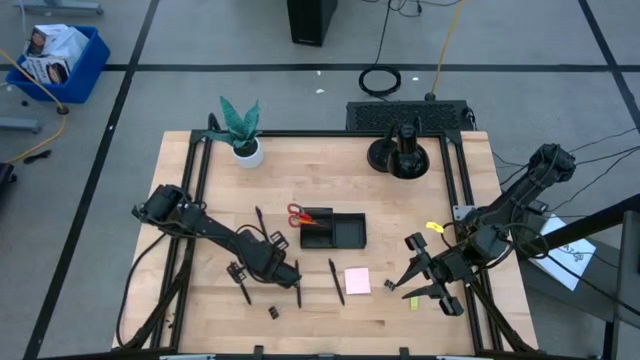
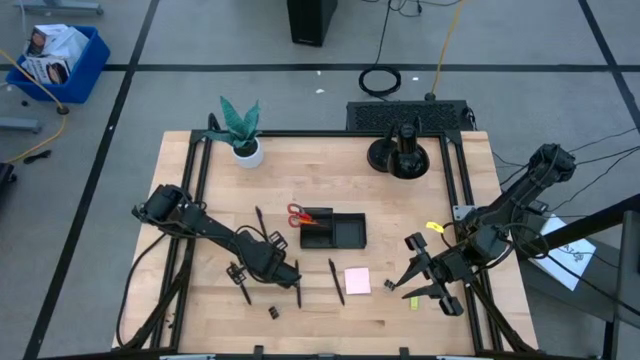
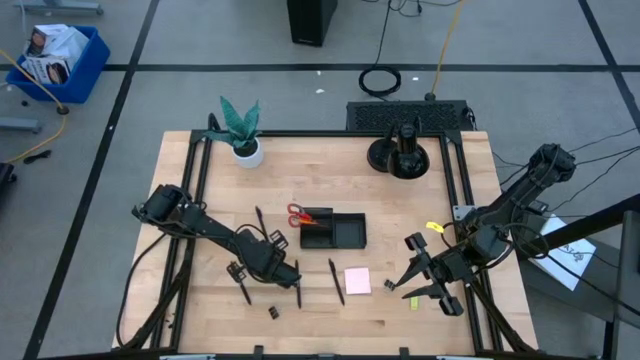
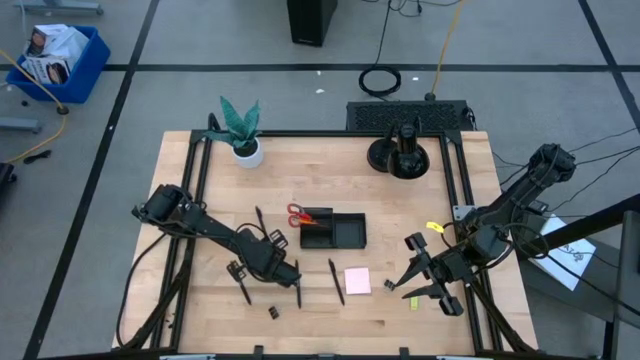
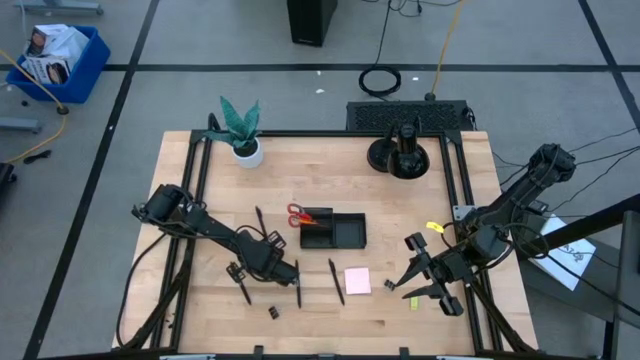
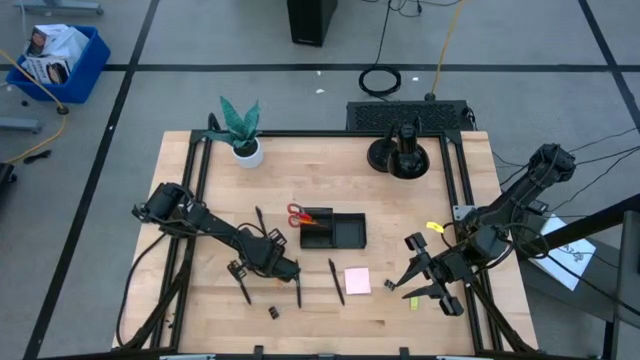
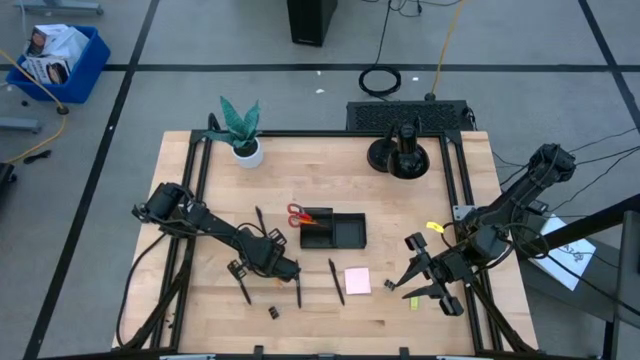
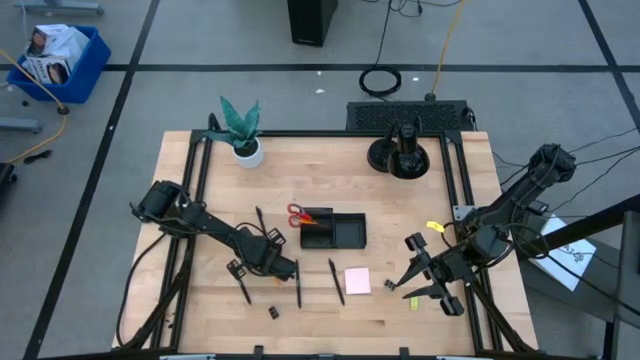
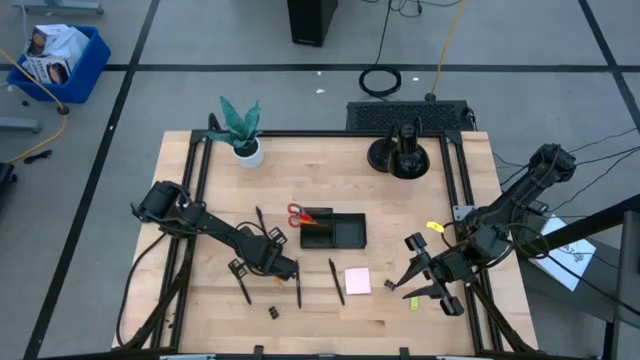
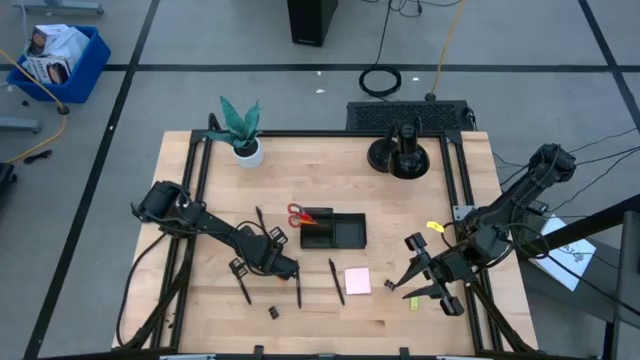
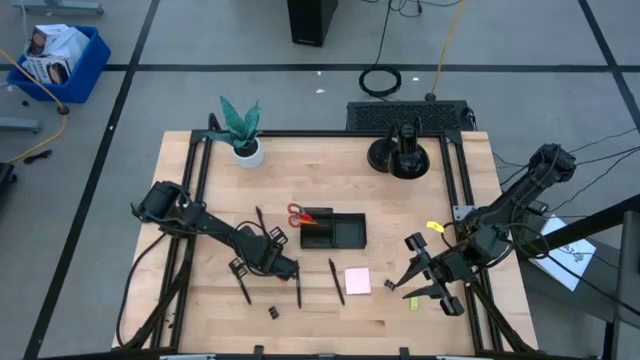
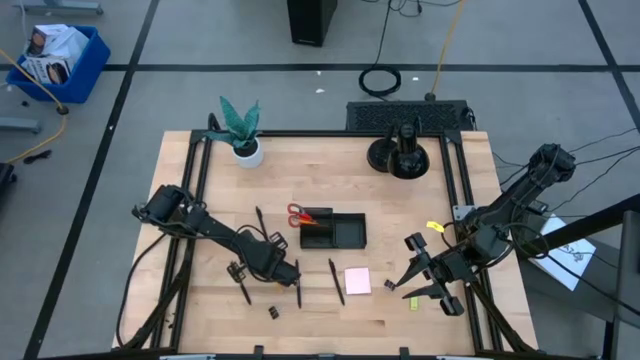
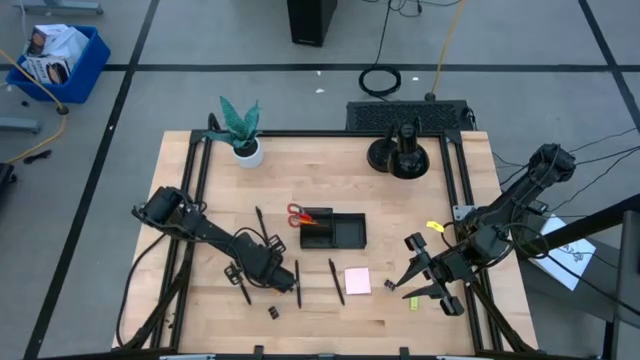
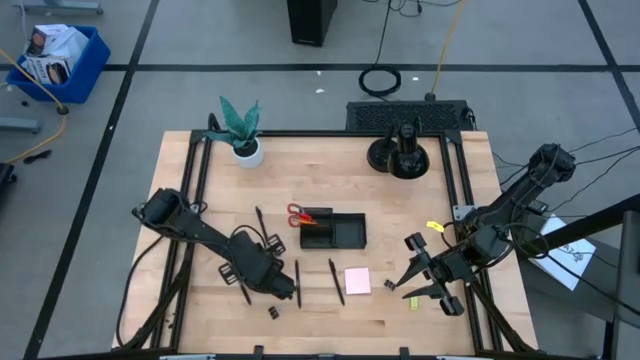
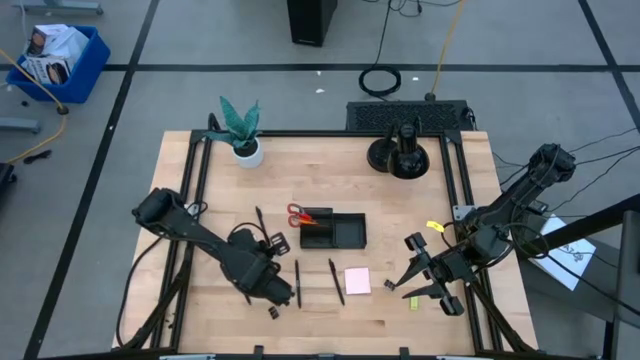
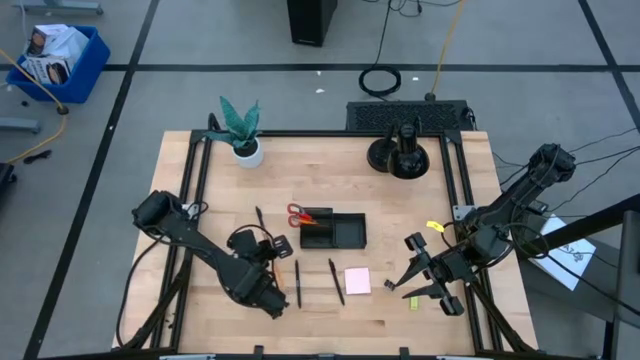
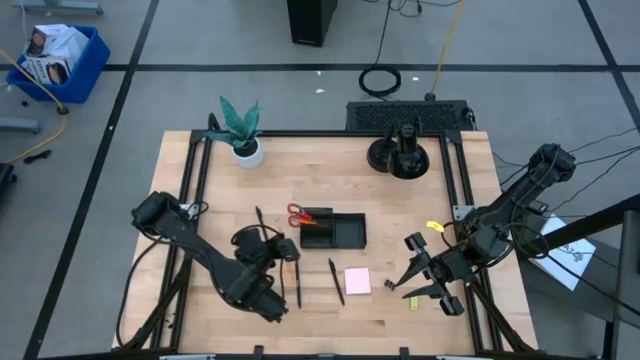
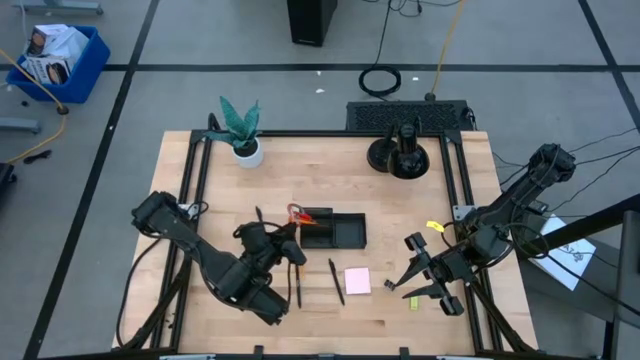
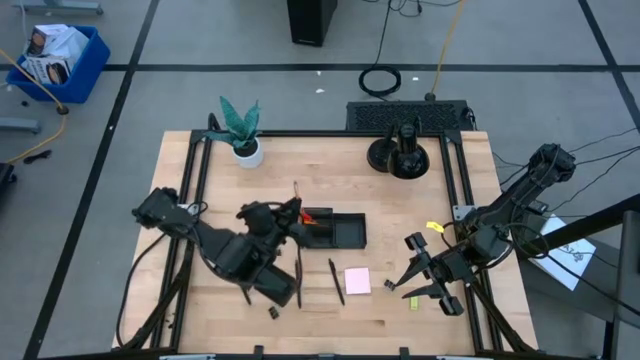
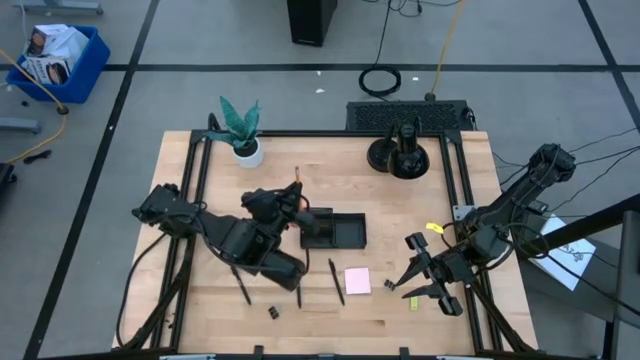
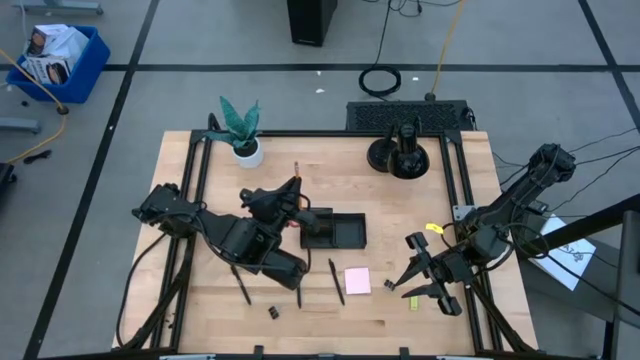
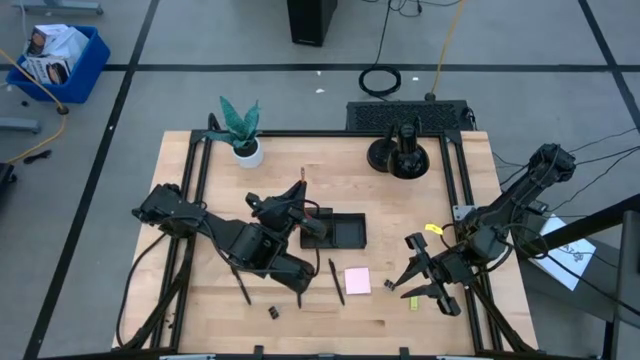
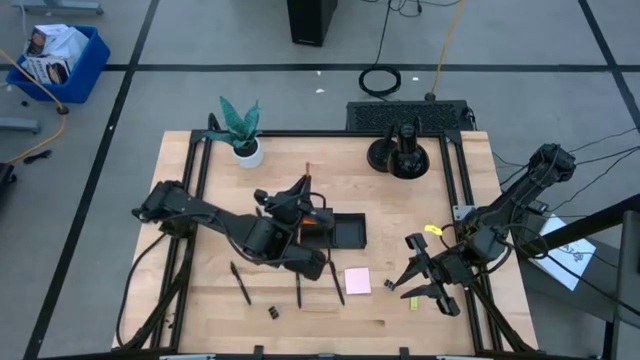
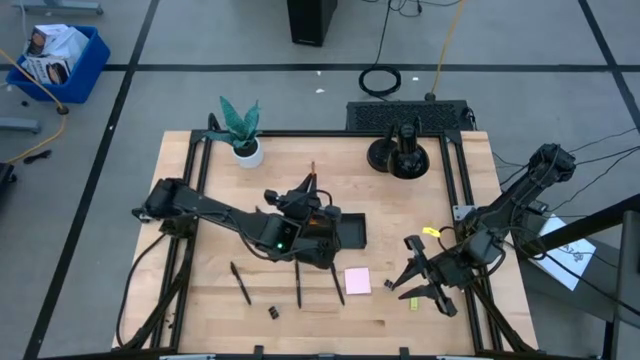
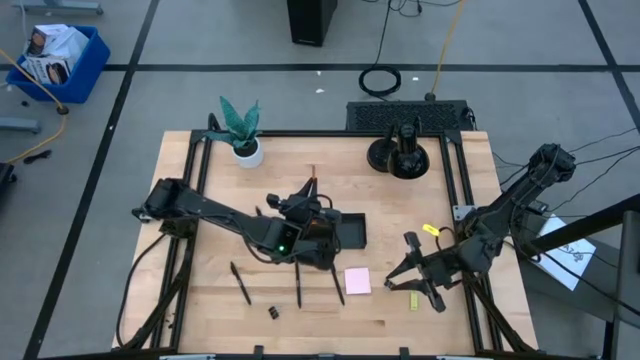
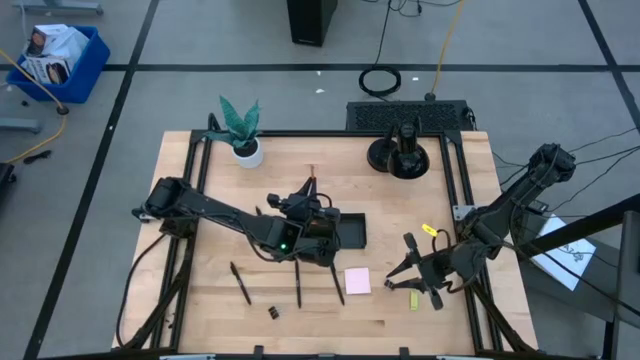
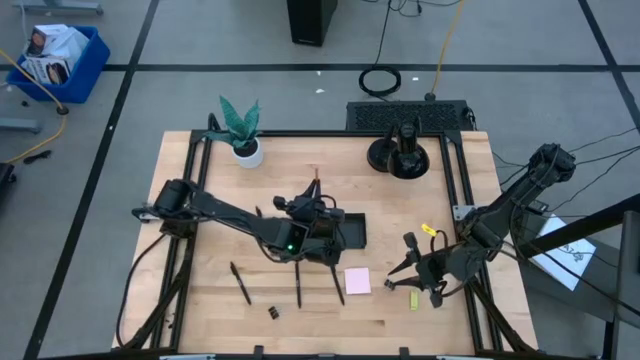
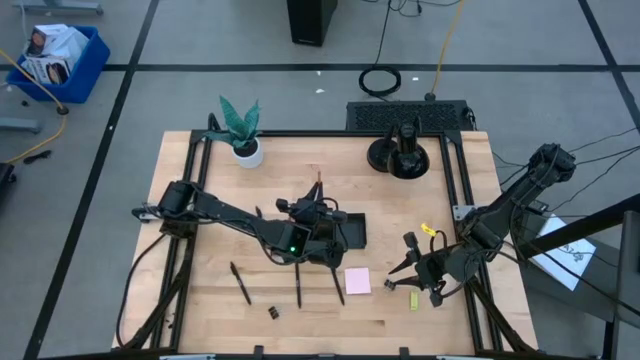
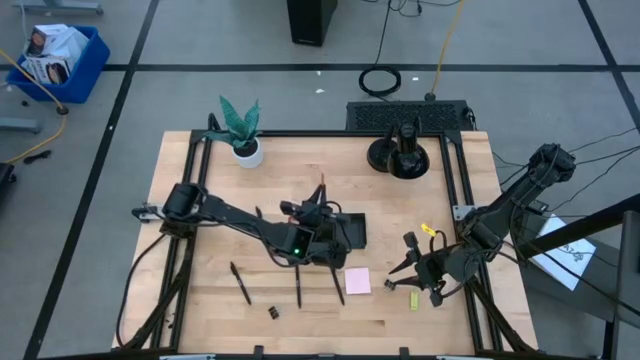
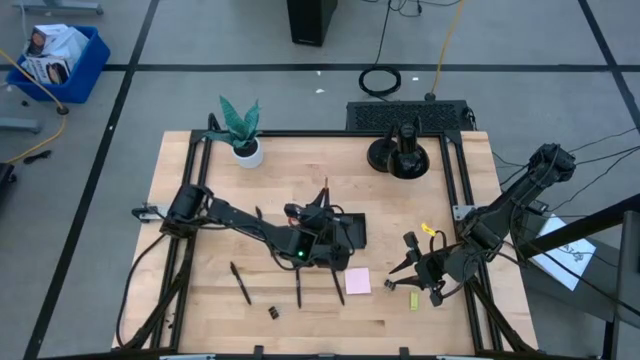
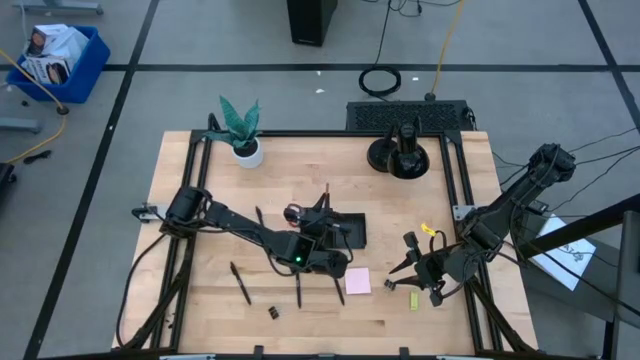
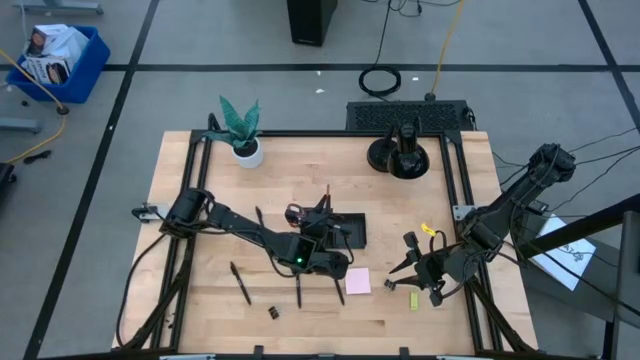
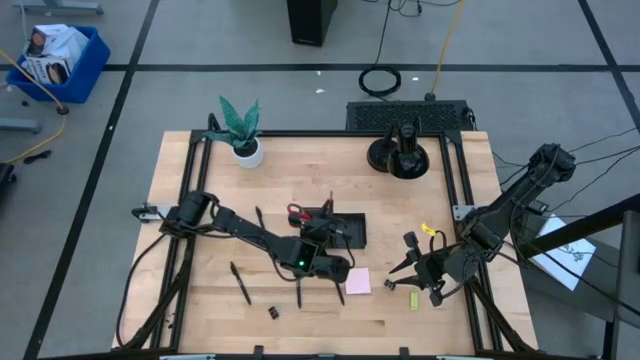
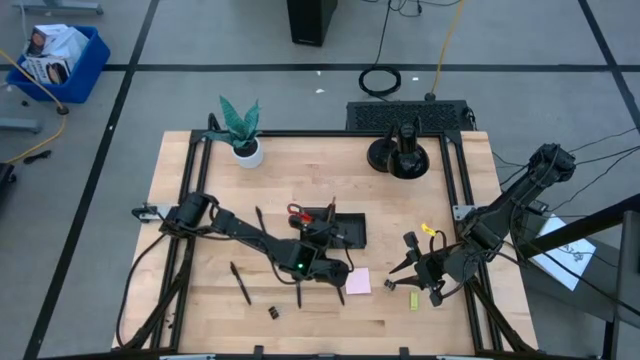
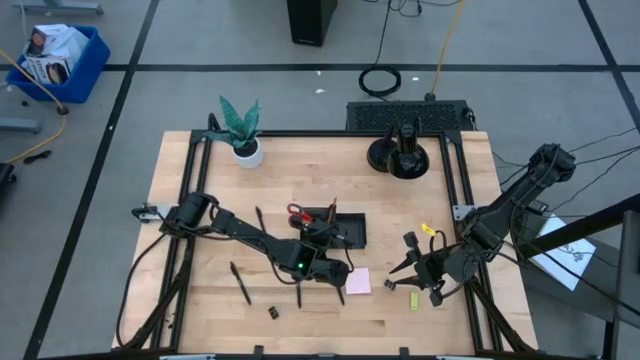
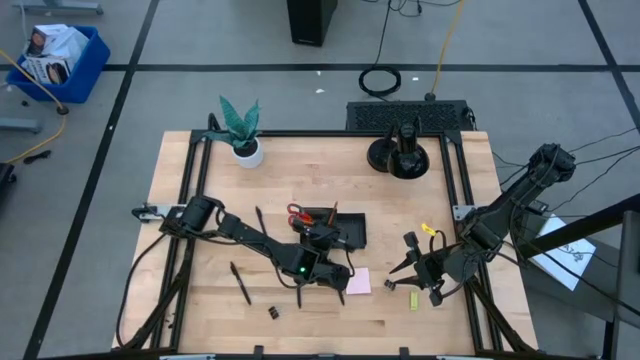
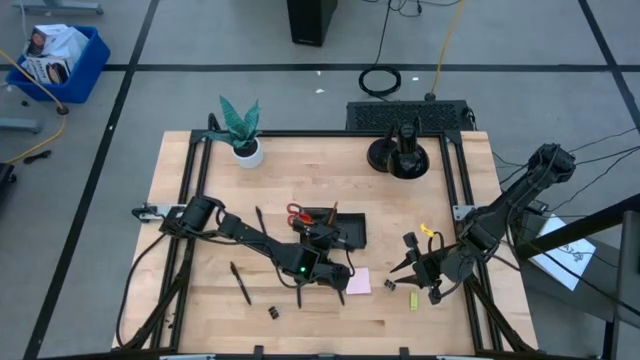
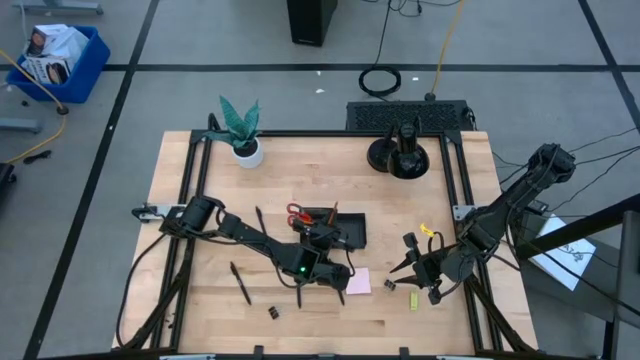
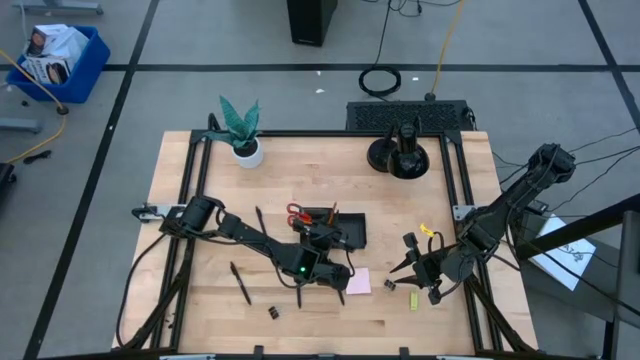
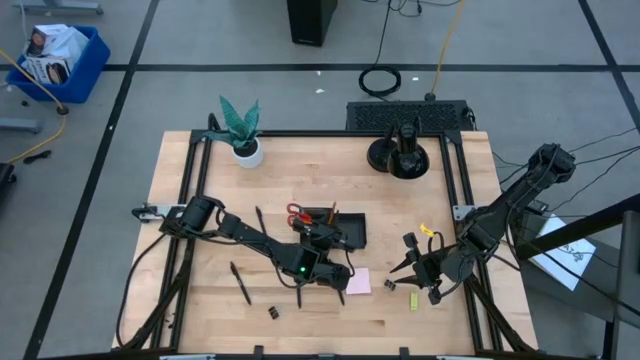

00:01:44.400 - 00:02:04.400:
Task: Pick and place office supplies into organizer
Put the orange pencil into the desk organizer
